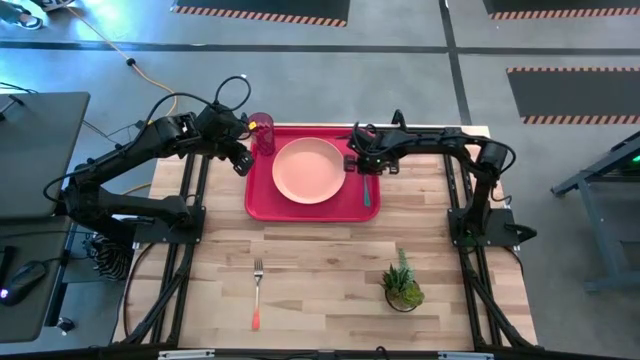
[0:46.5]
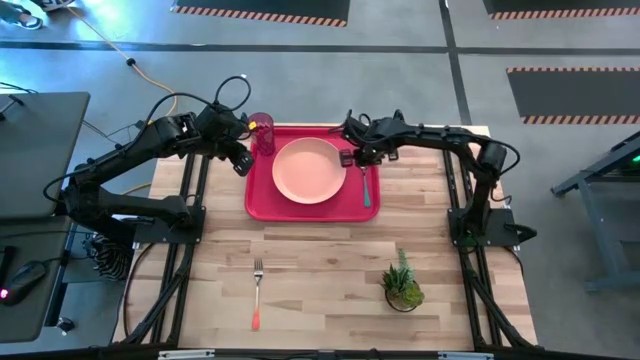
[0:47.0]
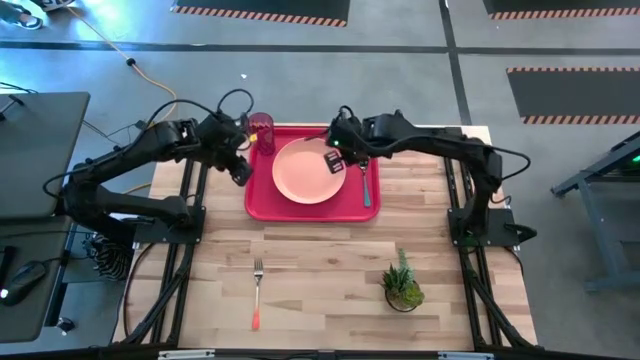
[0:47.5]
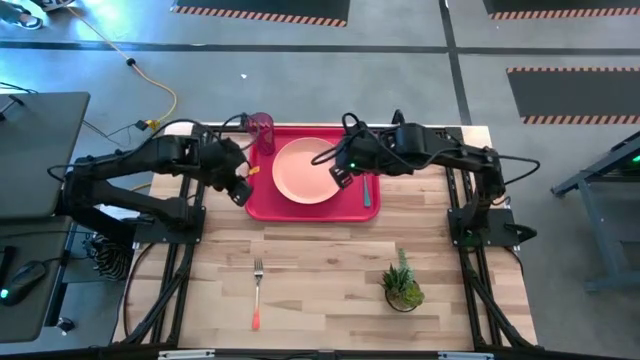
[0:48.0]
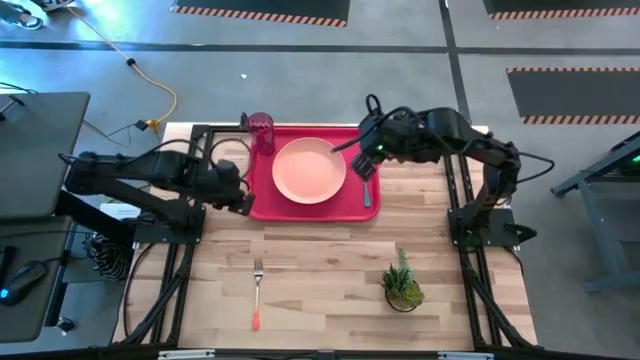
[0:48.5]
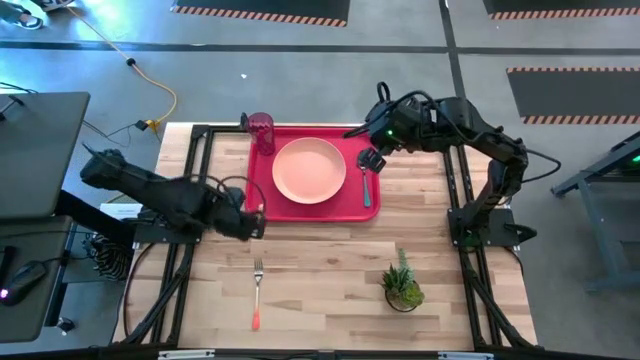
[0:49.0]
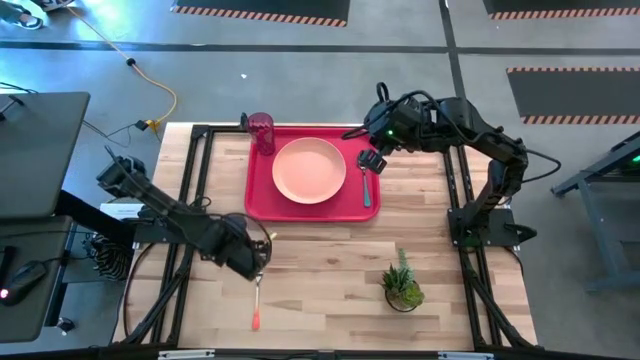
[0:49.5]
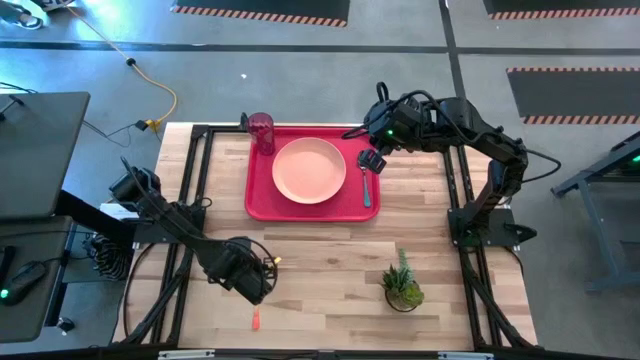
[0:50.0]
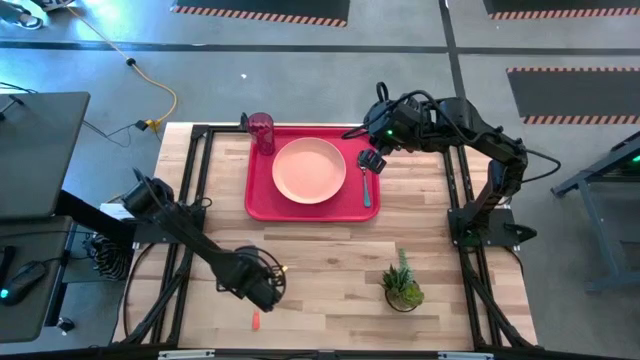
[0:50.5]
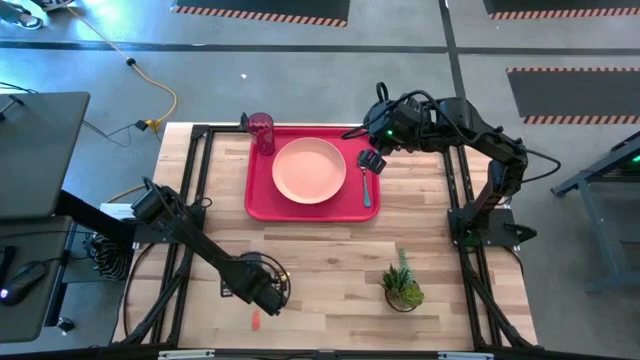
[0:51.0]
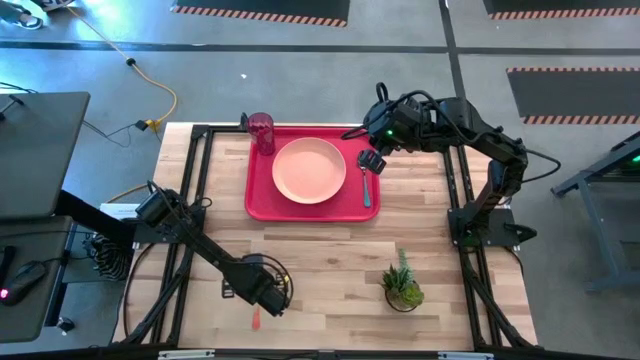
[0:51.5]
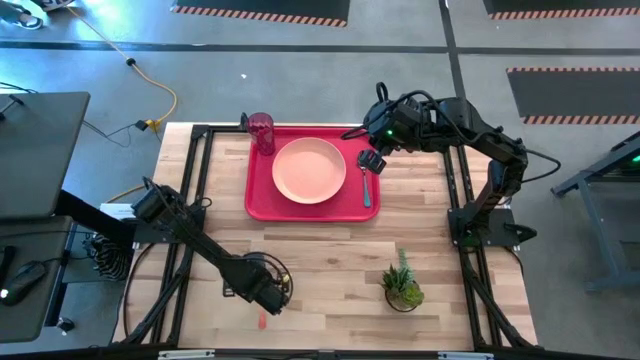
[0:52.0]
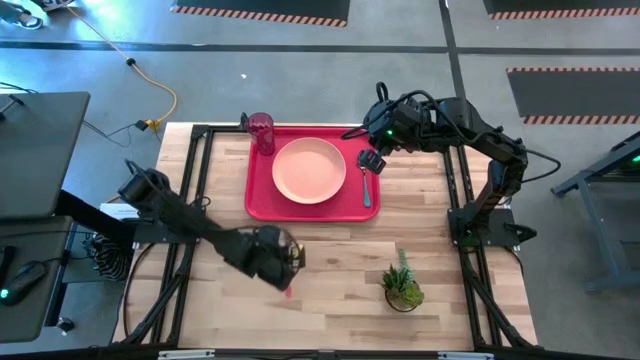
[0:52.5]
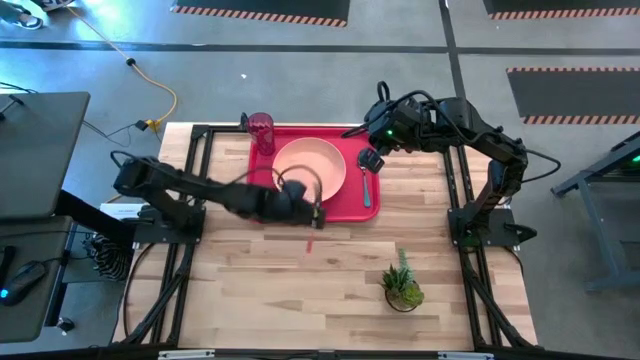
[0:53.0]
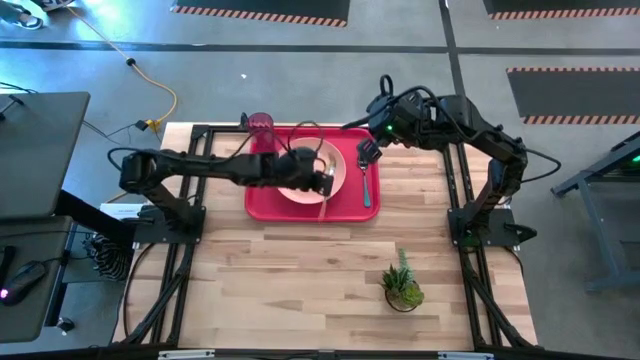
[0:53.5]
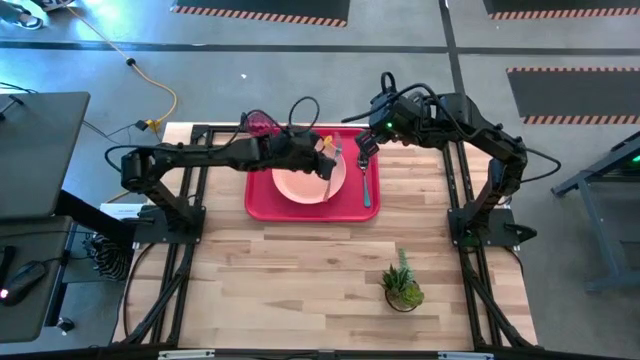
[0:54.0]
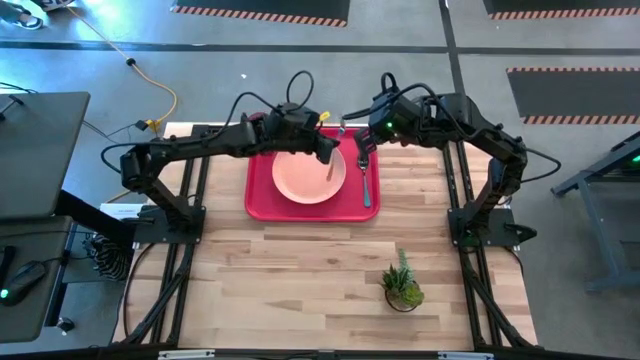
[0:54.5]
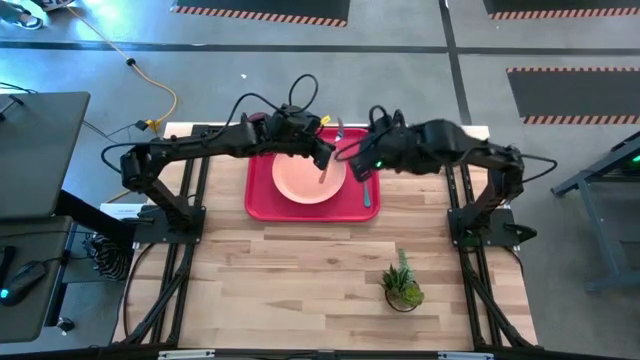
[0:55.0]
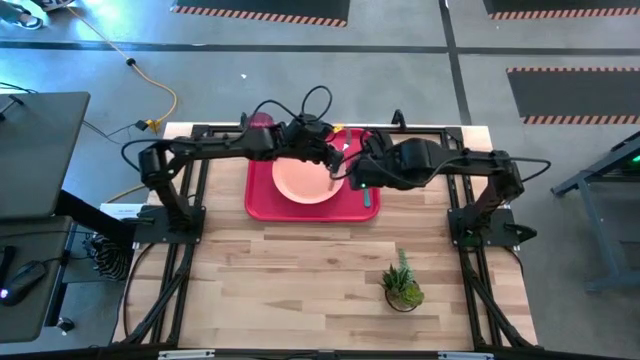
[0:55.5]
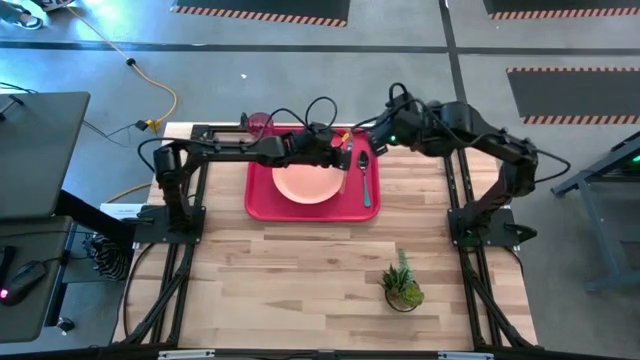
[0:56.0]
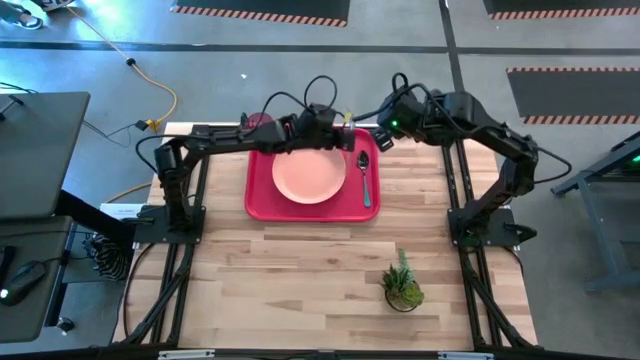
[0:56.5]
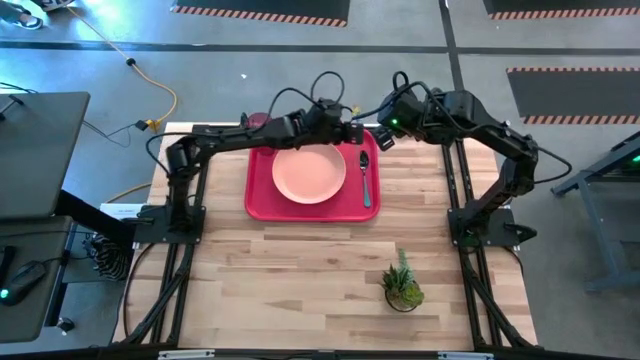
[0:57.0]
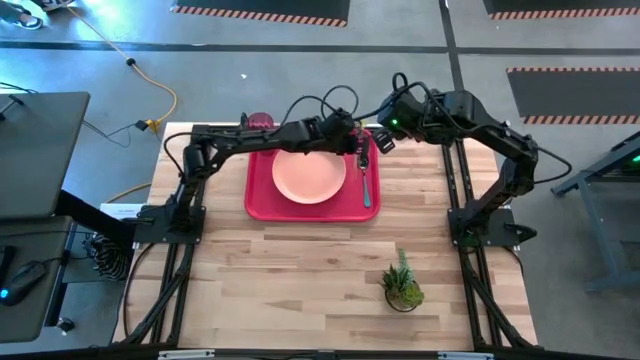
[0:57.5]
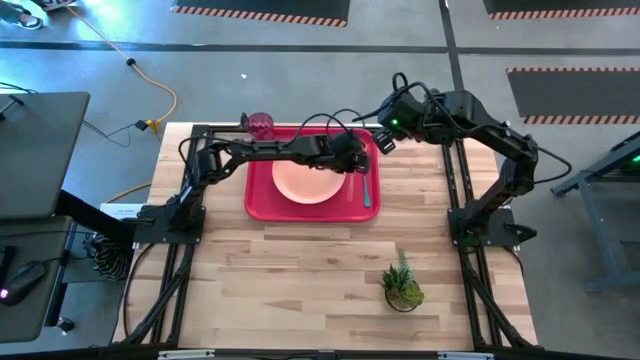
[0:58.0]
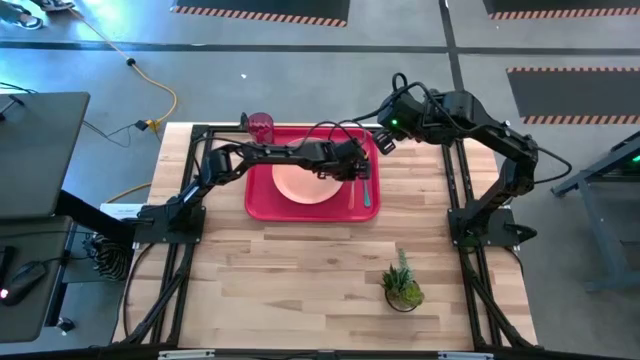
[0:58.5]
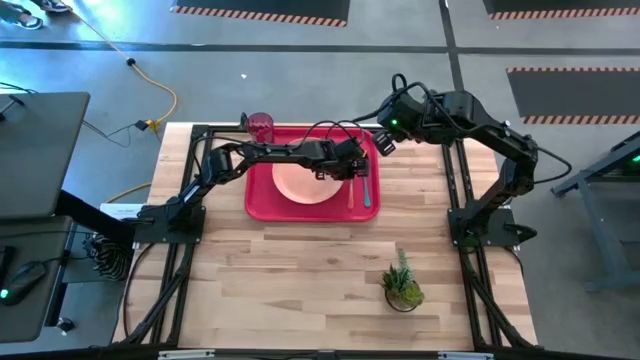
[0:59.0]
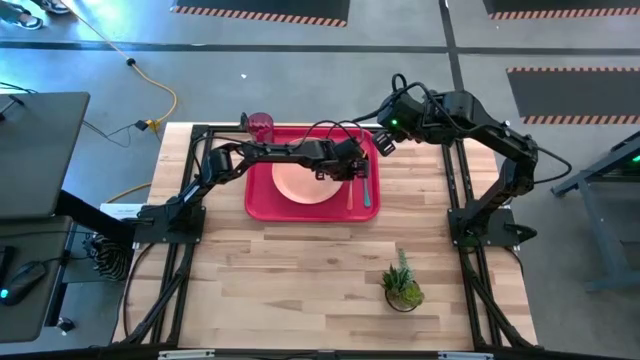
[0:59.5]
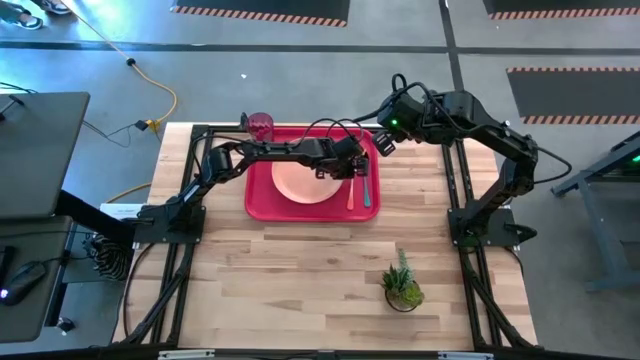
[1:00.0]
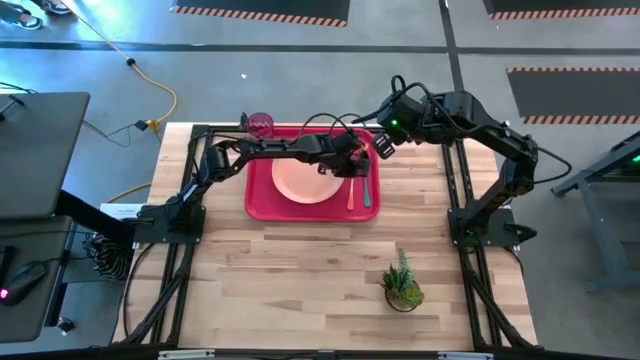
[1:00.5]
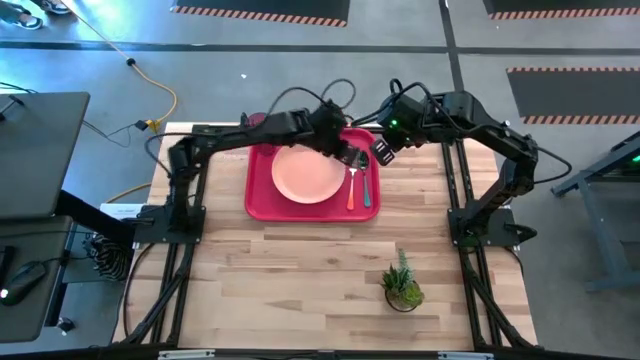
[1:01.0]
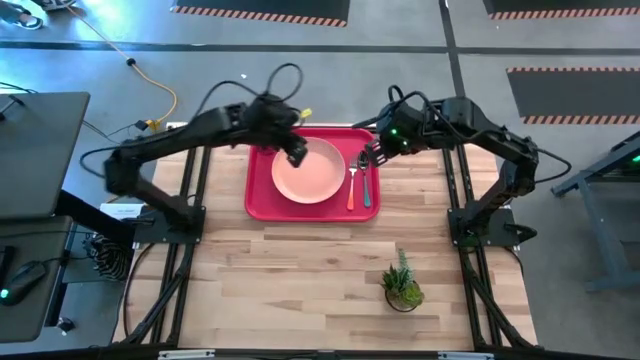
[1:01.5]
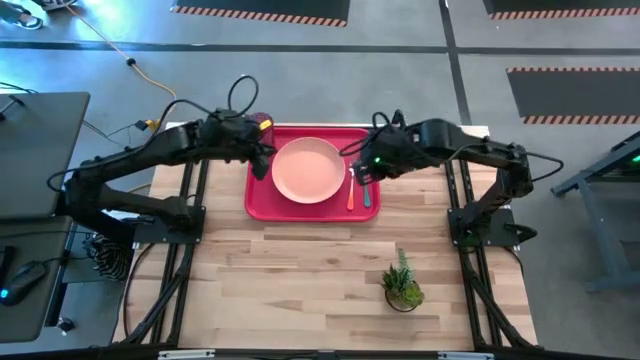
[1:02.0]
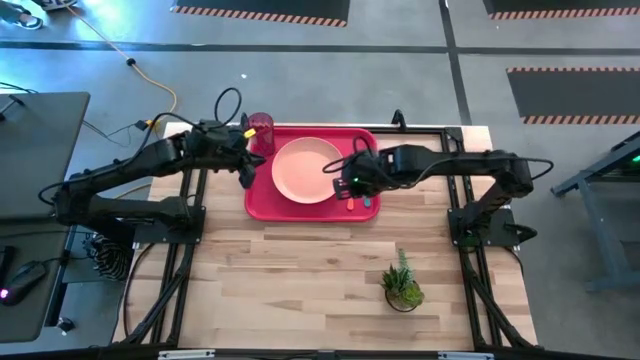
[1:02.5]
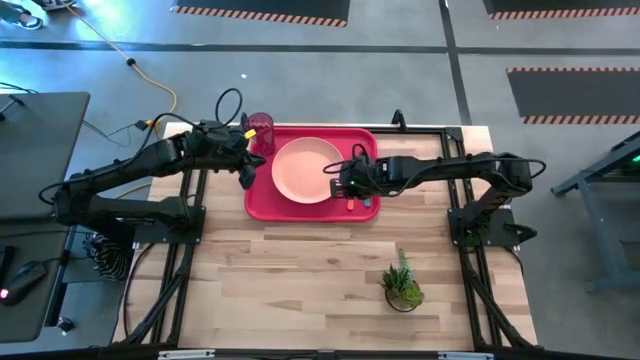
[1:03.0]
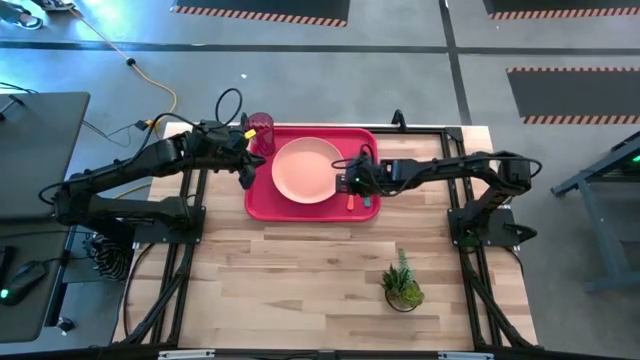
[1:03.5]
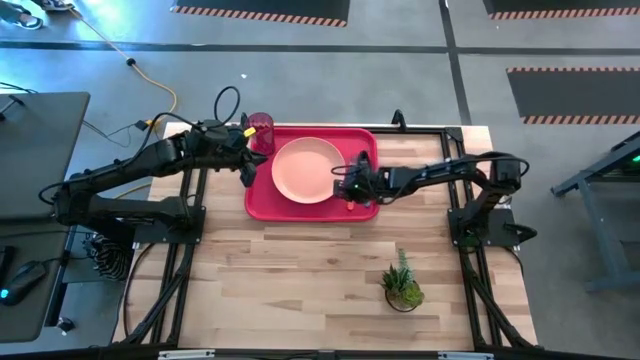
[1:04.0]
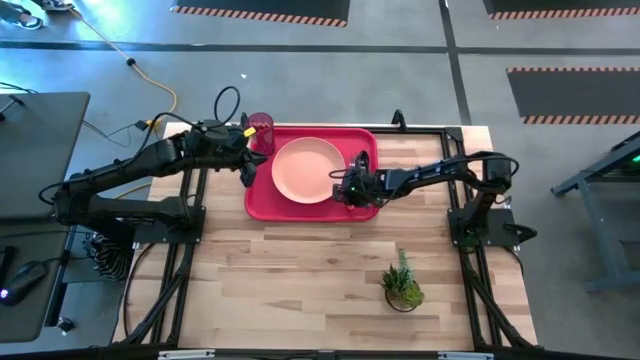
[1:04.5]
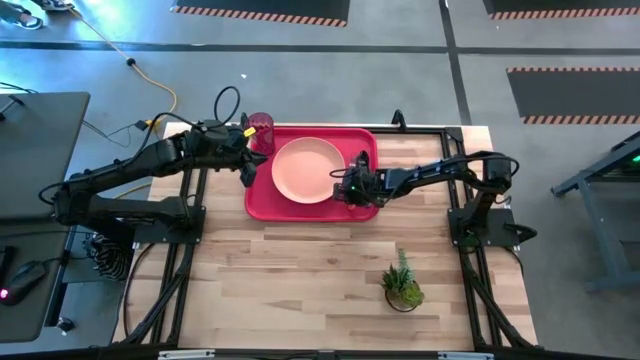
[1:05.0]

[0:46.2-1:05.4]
Task: Pick and place plate/cup/fork/spoon on tray
Put the orange fork on the red tray to the right of the pink plate

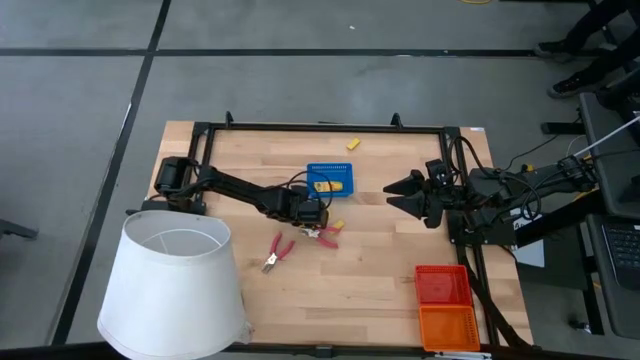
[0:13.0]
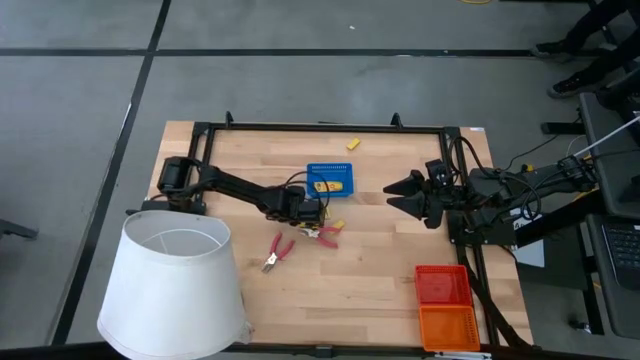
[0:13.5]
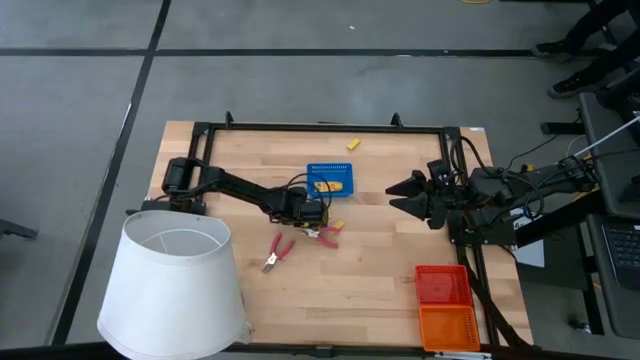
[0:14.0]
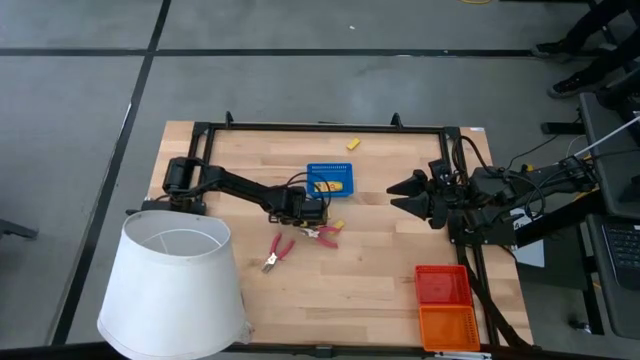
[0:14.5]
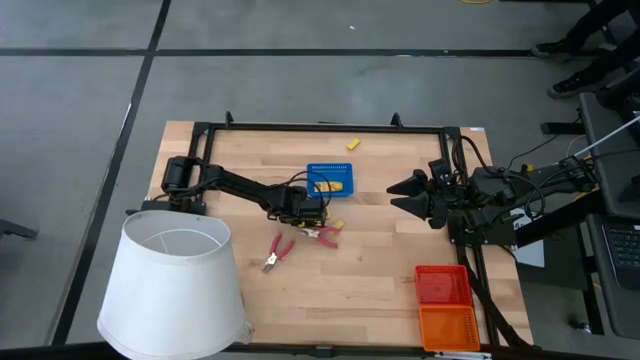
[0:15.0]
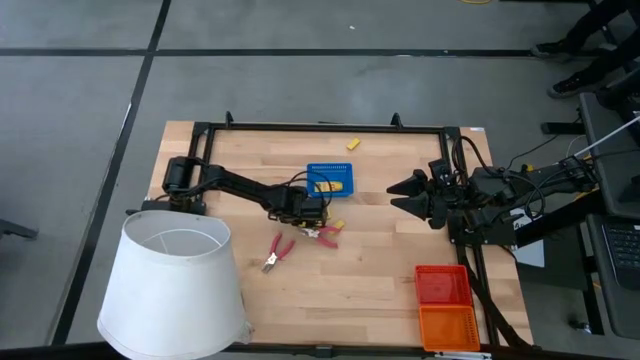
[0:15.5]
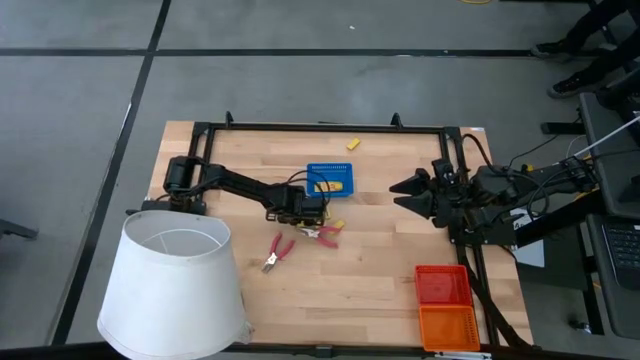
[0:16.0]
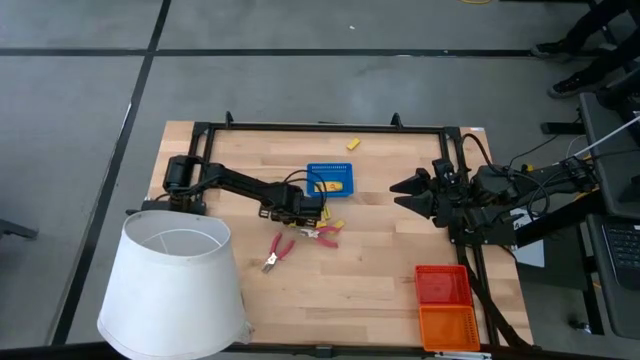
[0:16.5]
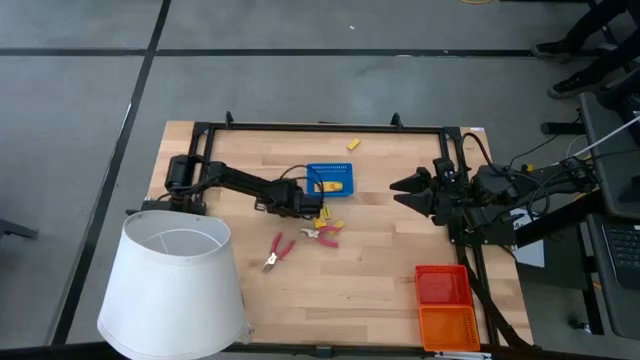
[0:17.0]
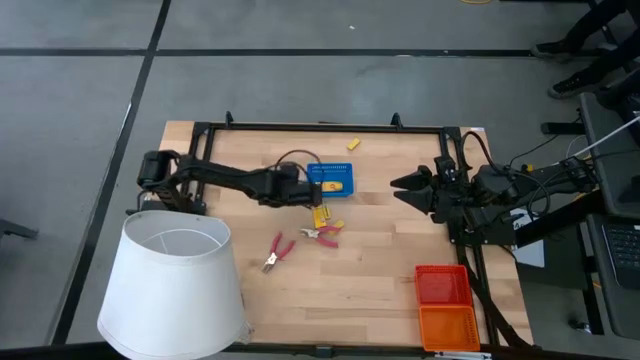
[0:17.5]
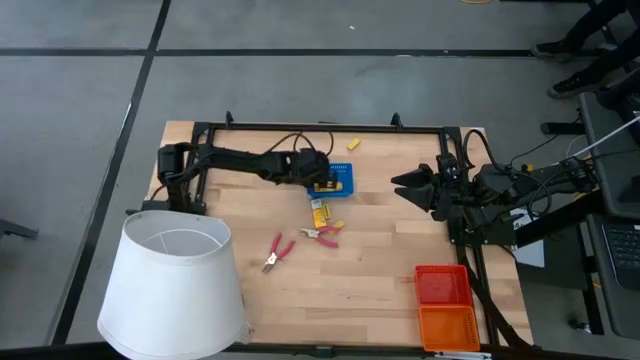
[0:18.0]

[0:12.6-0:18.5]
Task: Pick & Place School Supplies
Put the yellow crayon box into the blue bin
